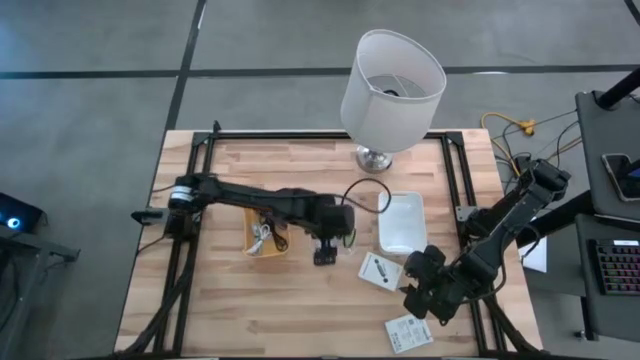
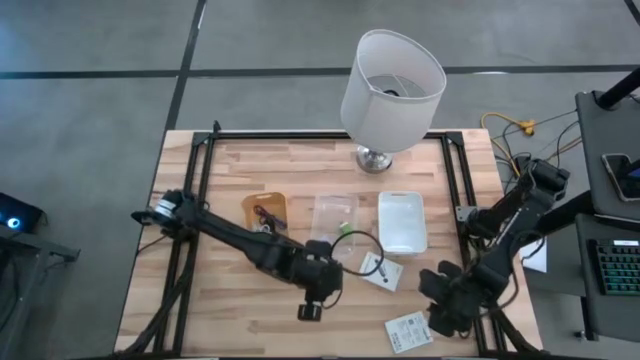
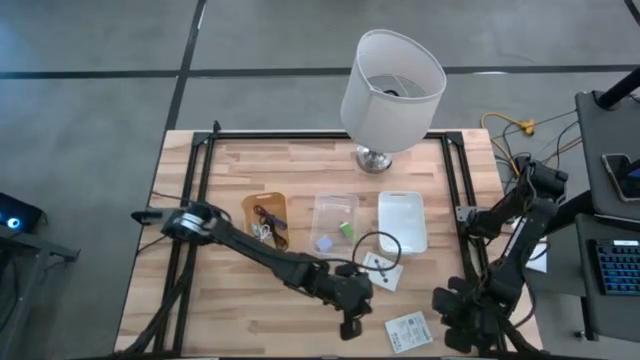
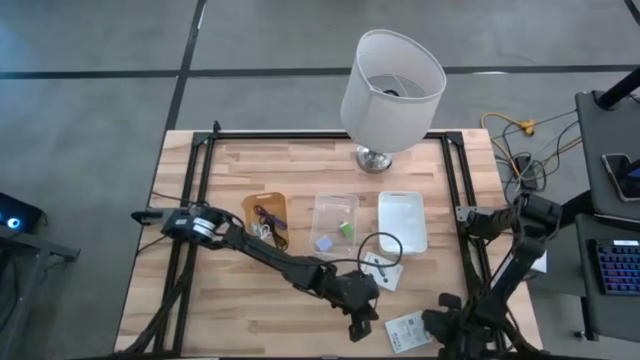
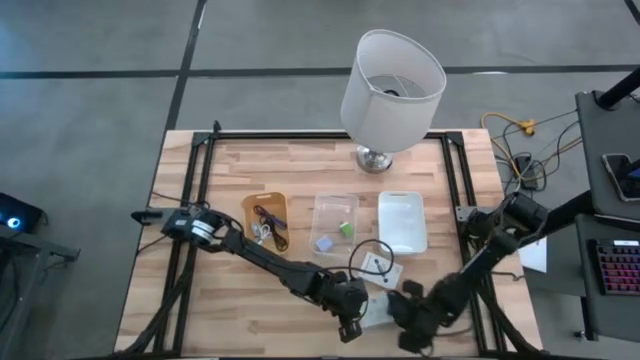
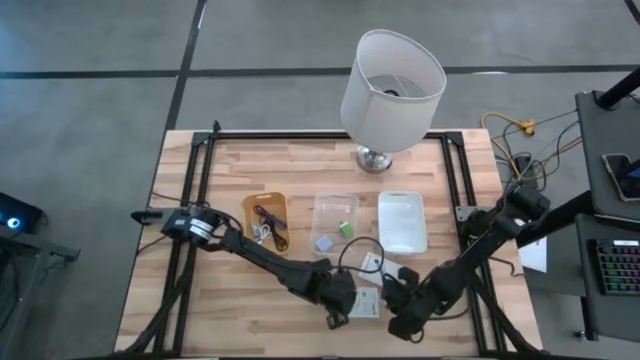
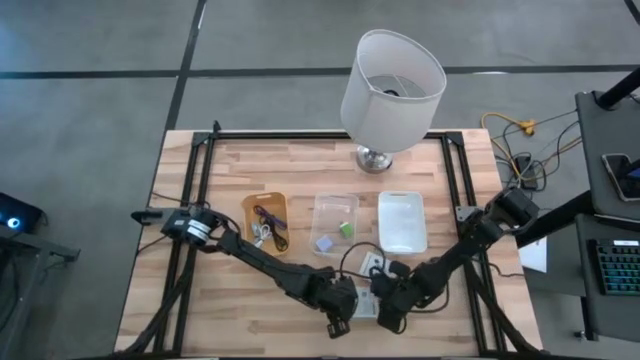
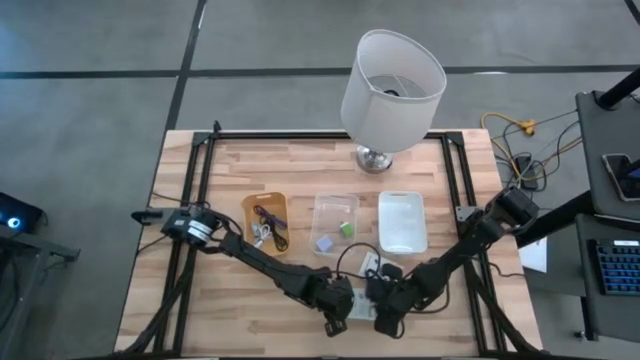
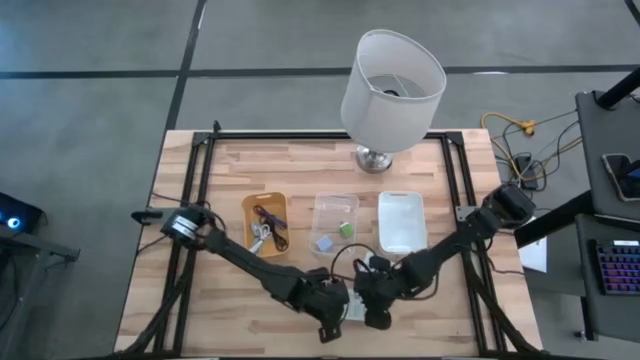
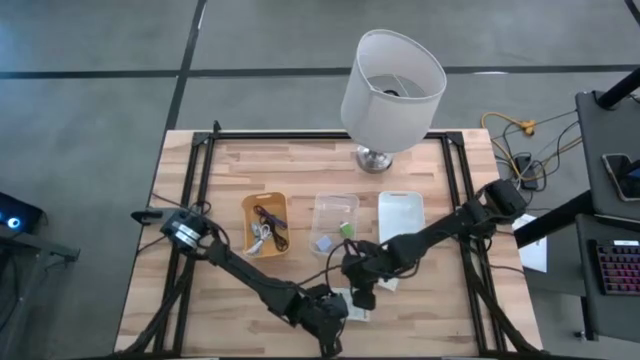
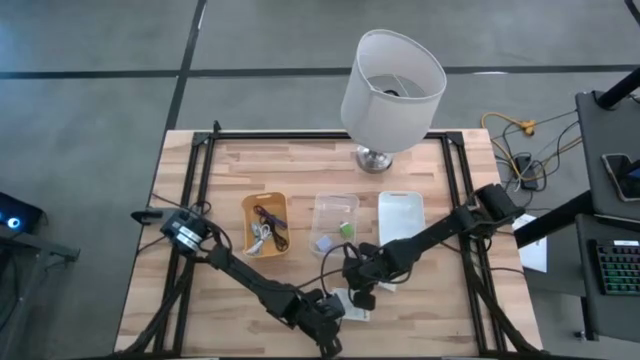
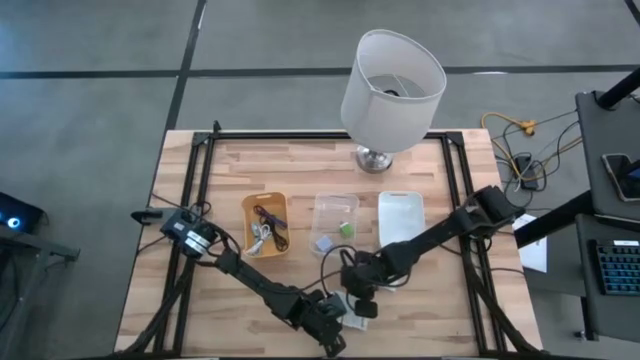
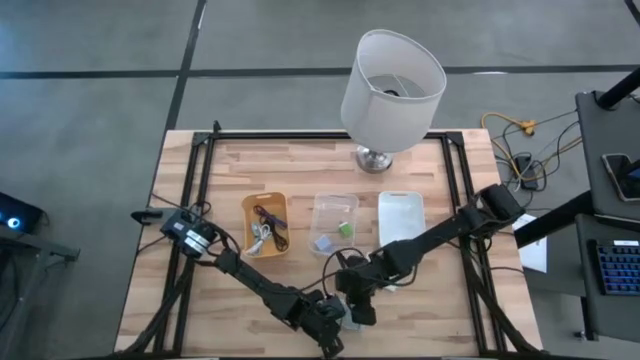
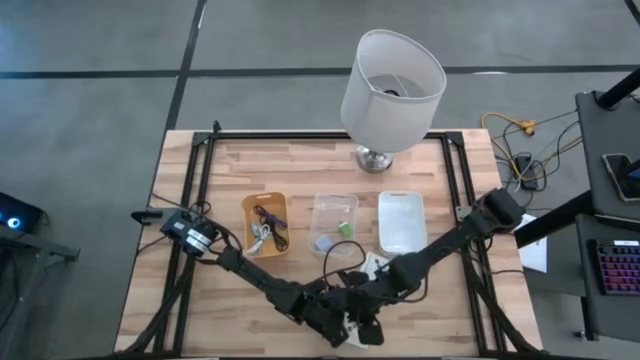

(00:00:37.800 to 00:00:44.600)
Task: Pick and place items into bin
Put the bottom white card reader box into the white bin

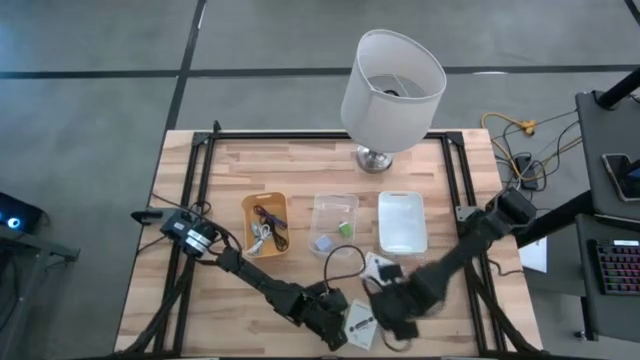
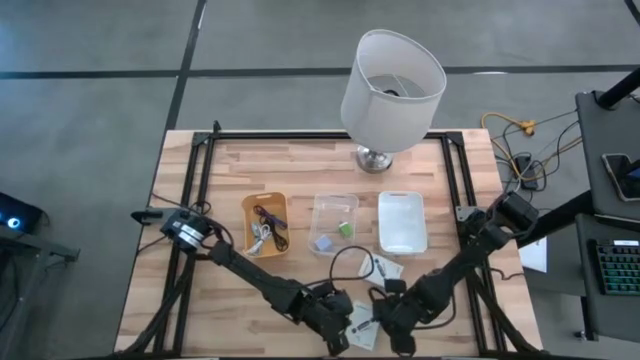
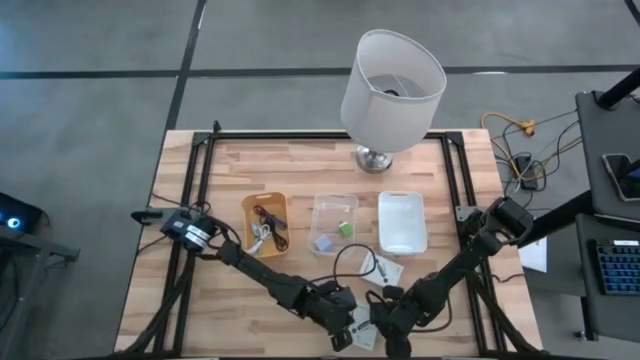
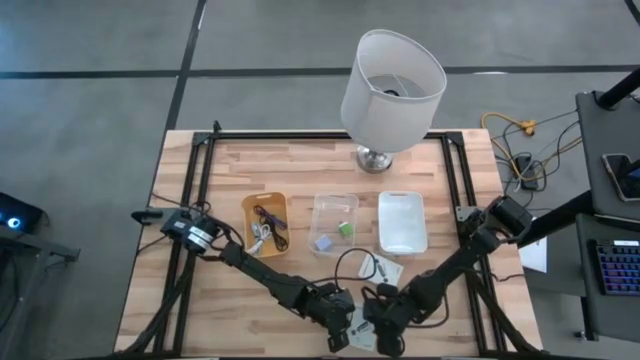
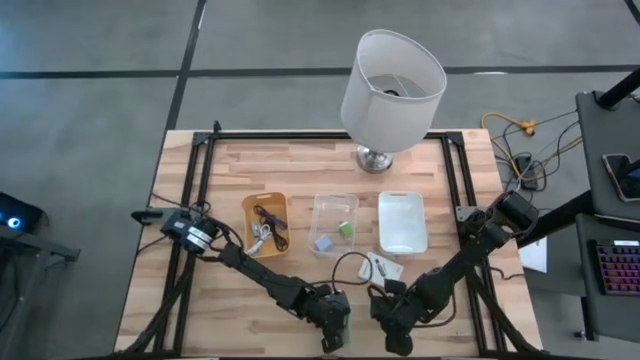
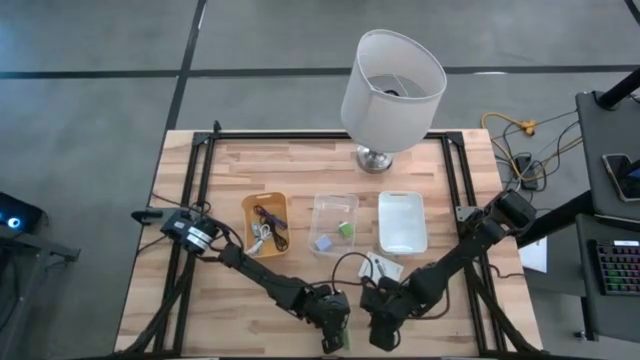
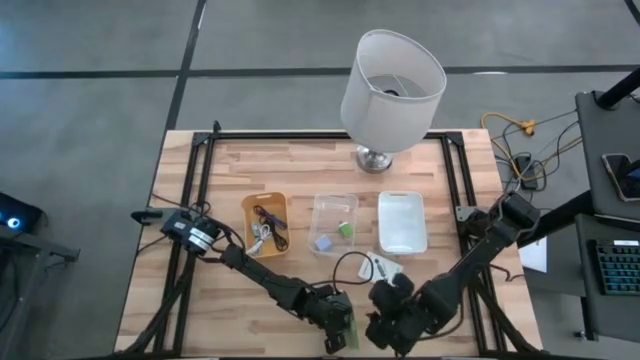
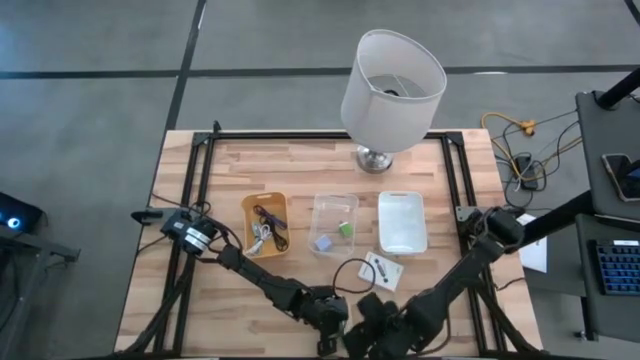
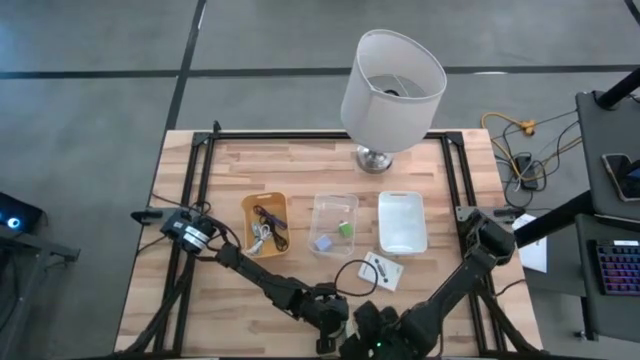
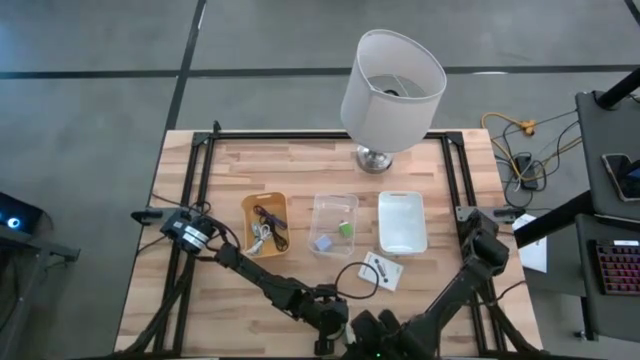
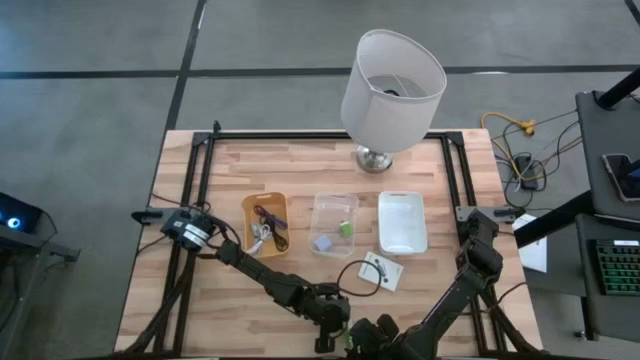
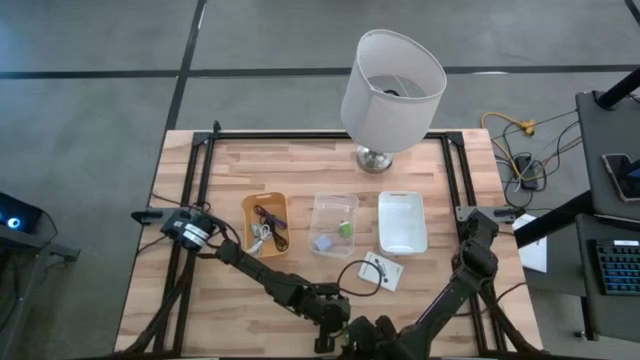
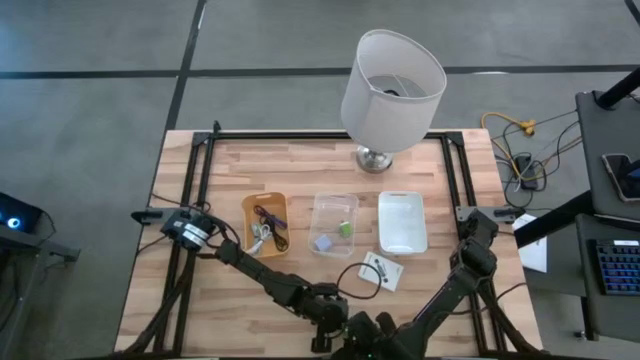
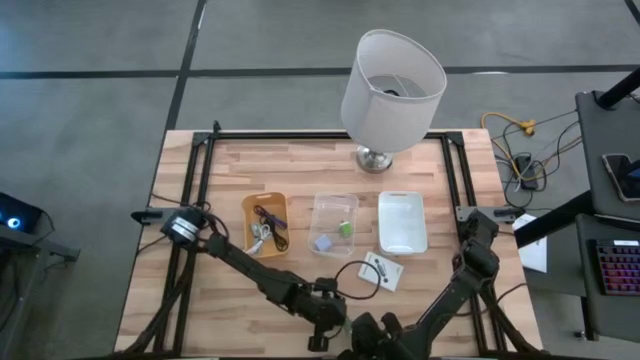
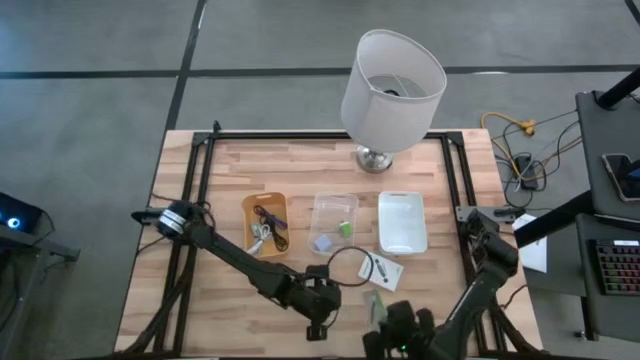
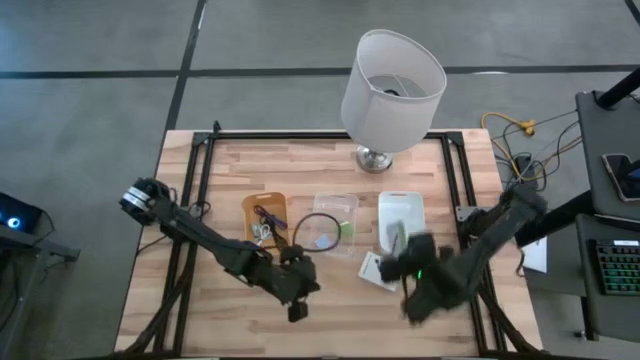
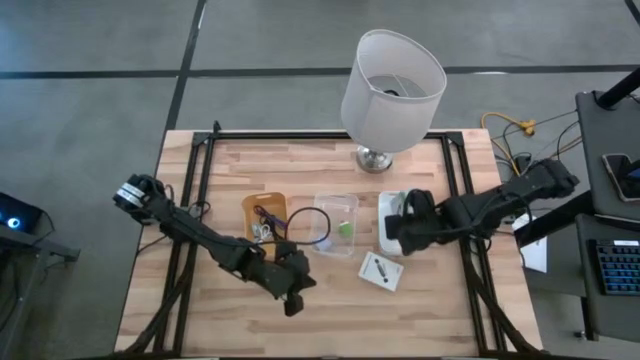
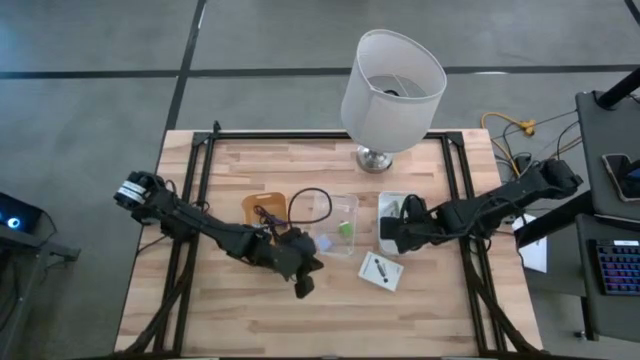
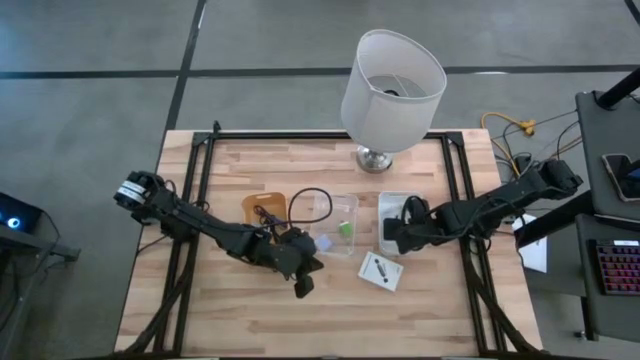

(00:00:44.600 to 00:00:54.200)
Put the bottom white card reader box into the white bin

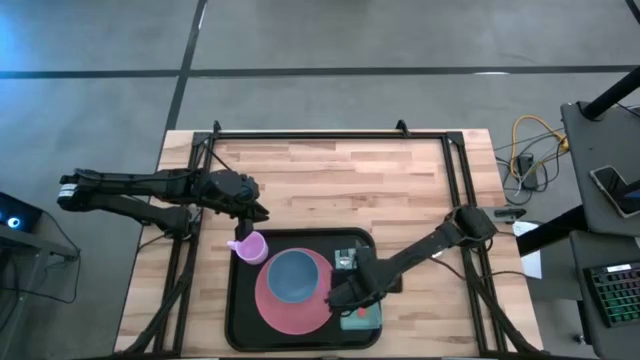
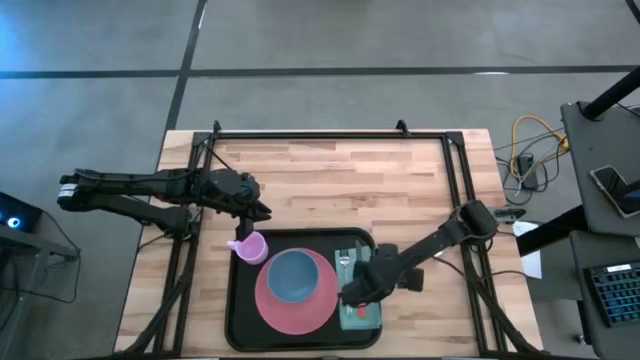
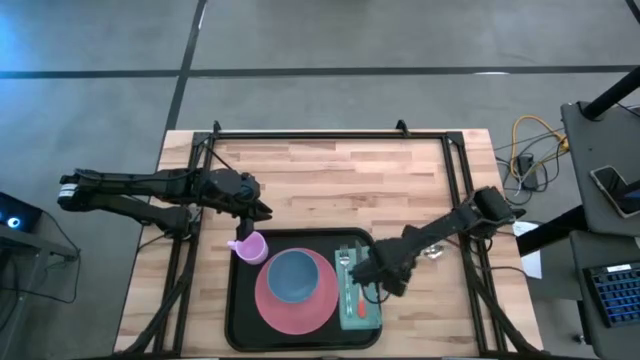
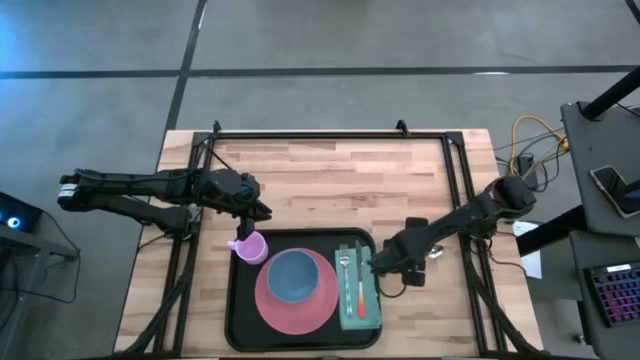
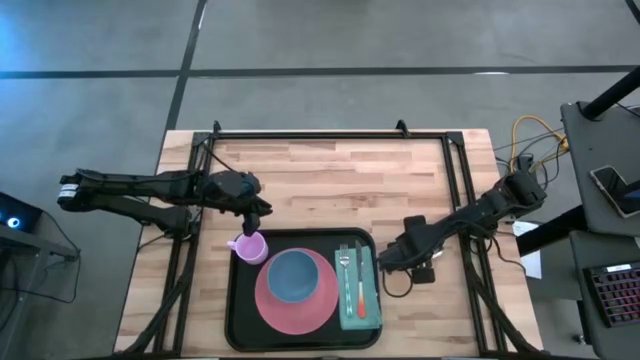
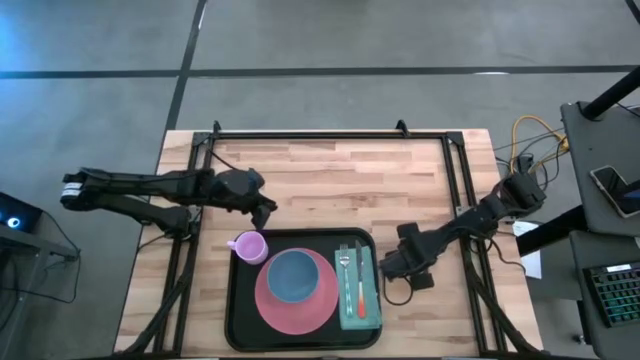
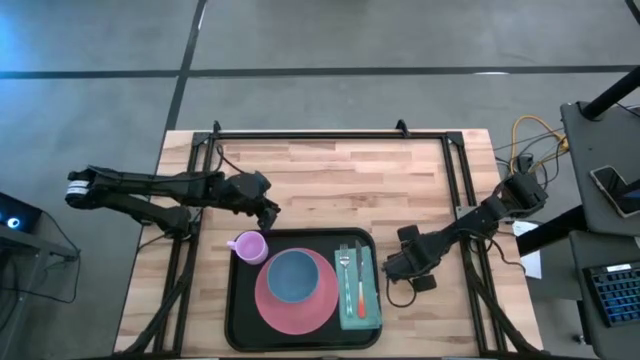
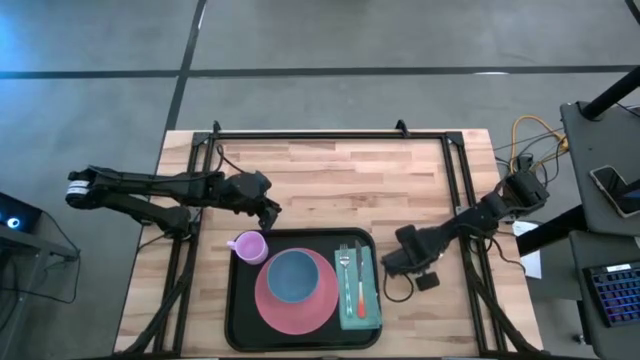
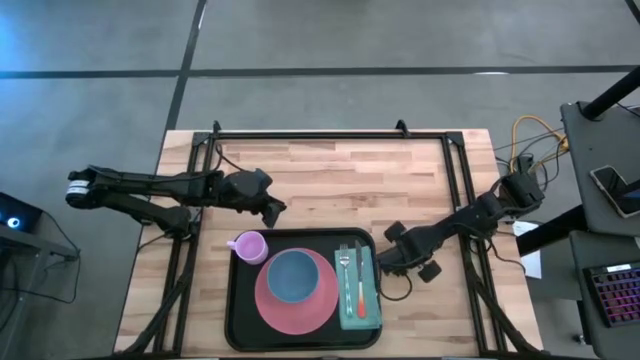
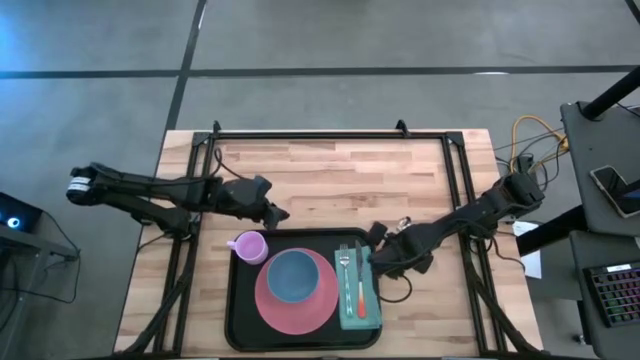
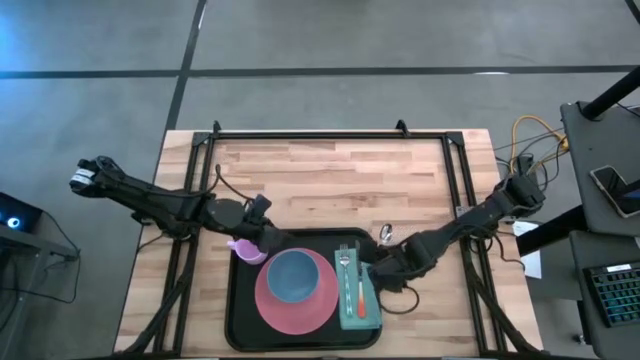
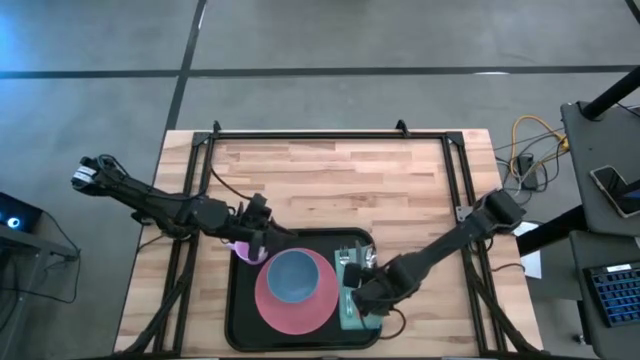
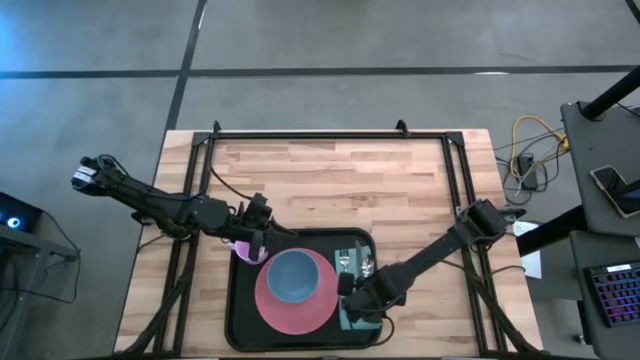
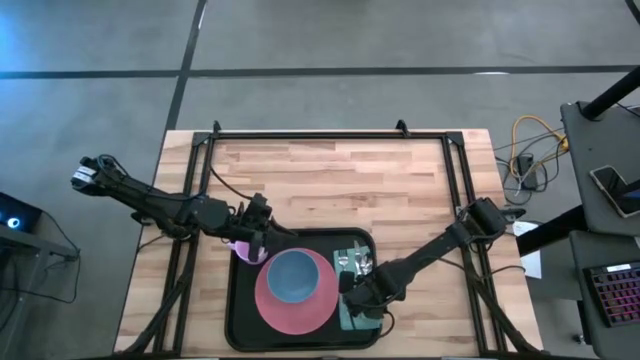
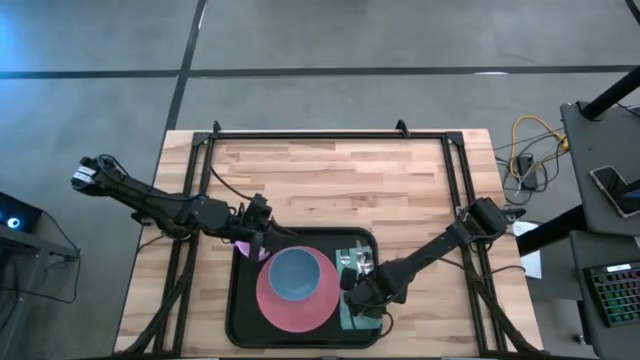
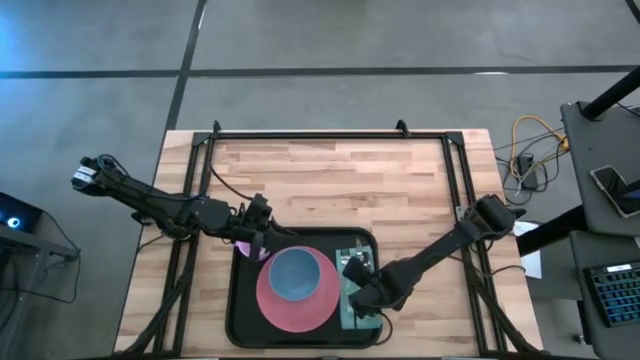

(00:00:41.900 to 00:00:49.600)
Task: Set up tray
Put the green spoon on the blue napkin
